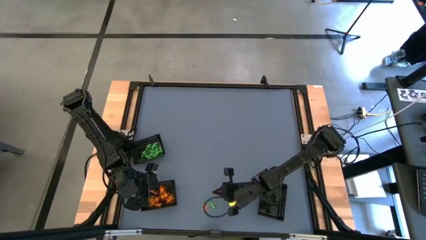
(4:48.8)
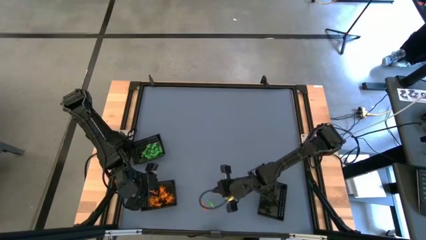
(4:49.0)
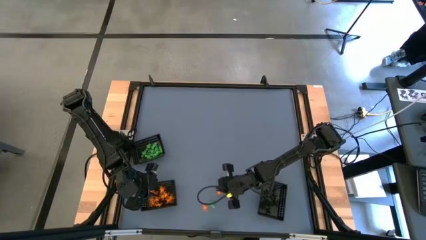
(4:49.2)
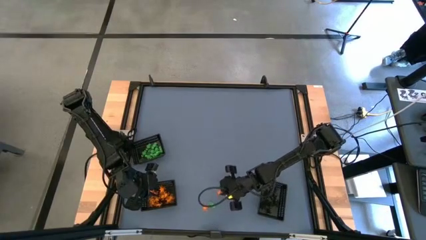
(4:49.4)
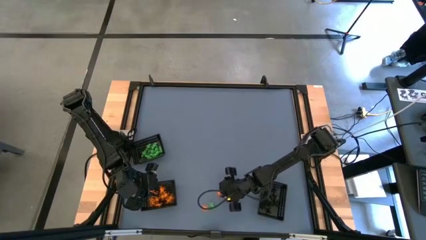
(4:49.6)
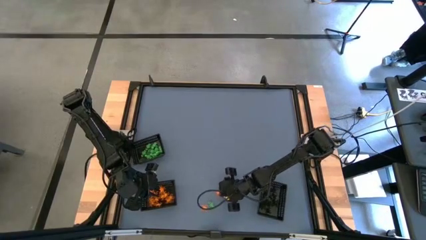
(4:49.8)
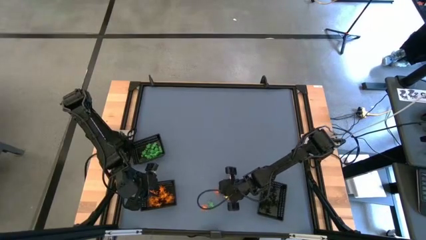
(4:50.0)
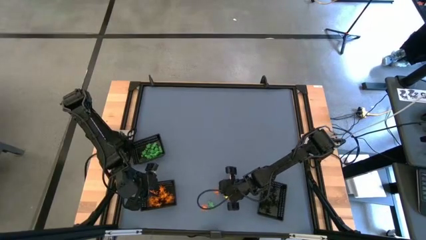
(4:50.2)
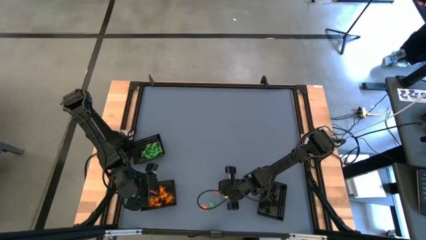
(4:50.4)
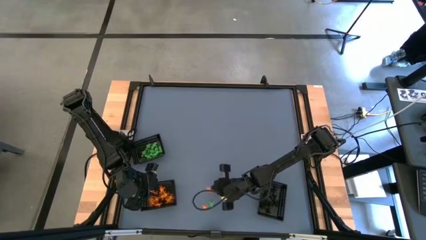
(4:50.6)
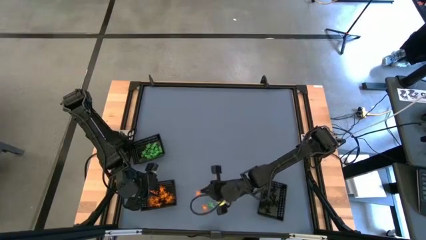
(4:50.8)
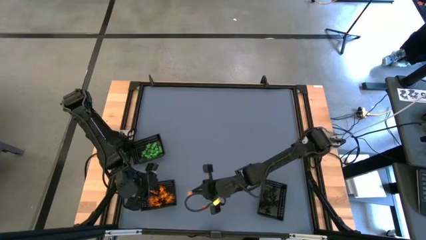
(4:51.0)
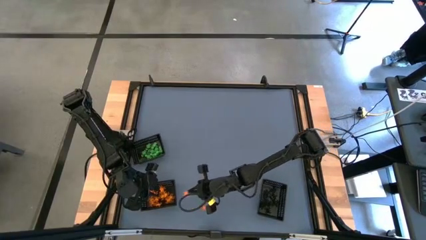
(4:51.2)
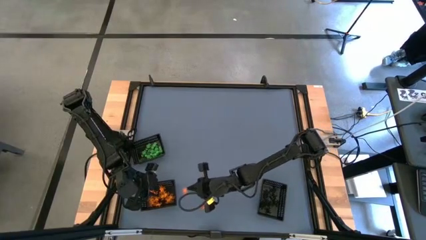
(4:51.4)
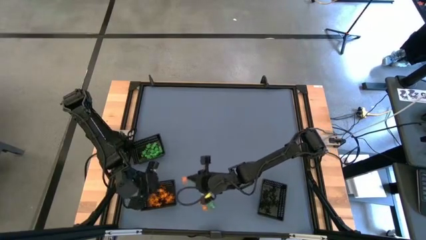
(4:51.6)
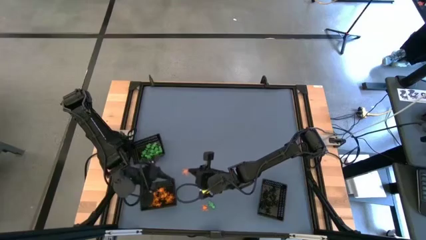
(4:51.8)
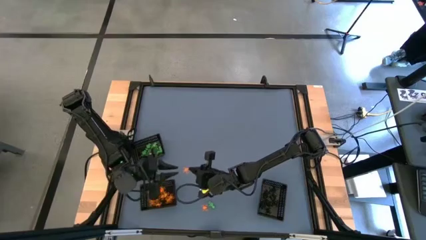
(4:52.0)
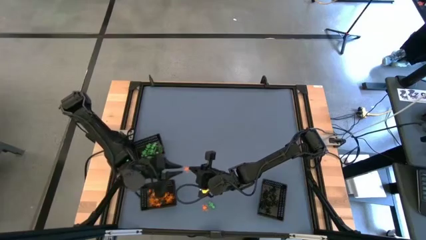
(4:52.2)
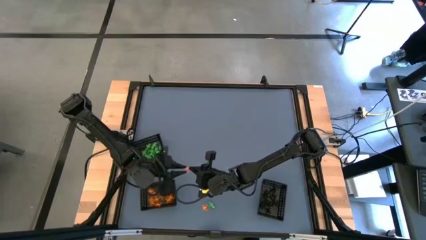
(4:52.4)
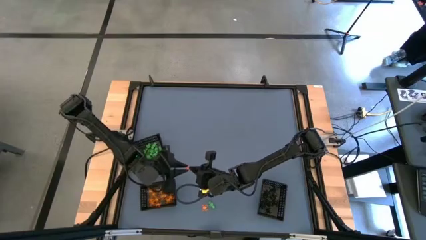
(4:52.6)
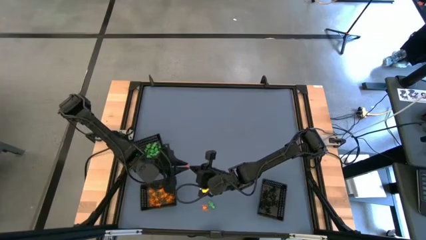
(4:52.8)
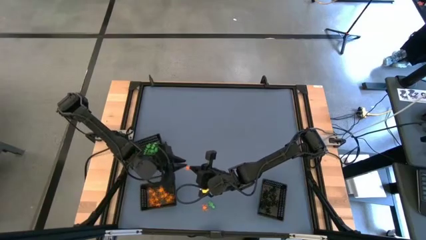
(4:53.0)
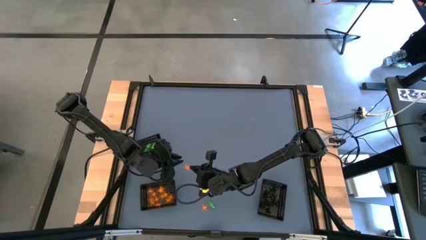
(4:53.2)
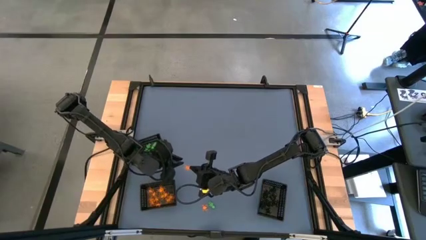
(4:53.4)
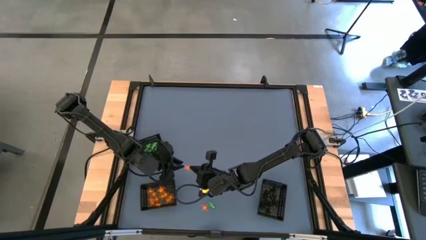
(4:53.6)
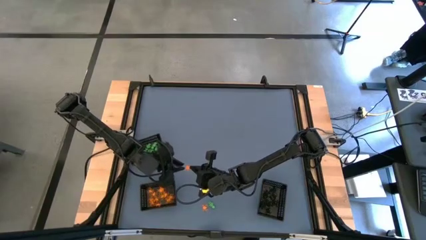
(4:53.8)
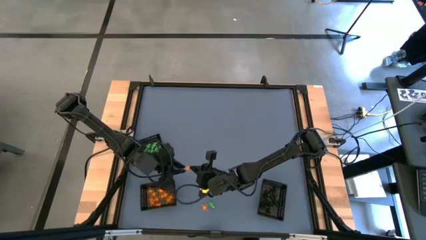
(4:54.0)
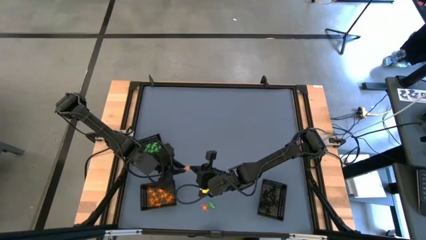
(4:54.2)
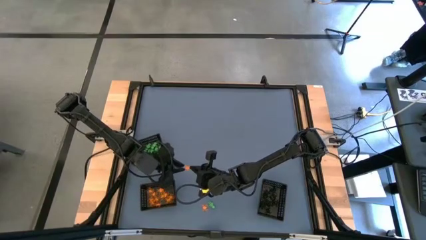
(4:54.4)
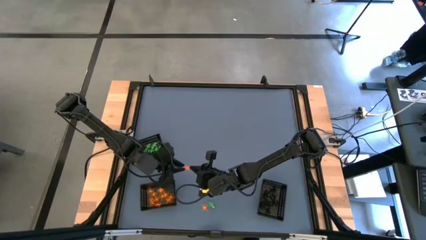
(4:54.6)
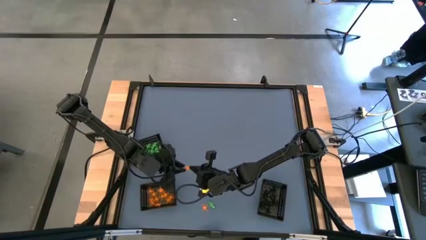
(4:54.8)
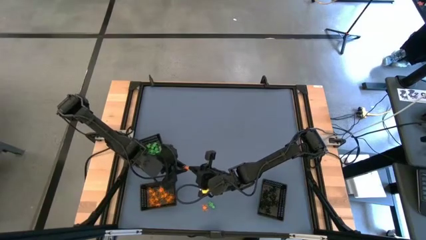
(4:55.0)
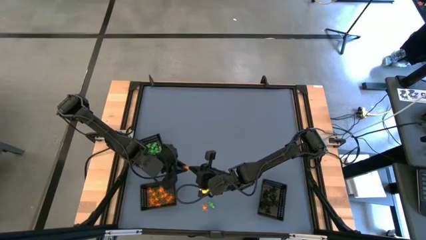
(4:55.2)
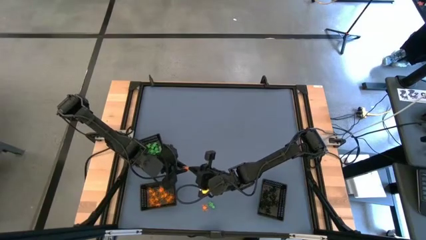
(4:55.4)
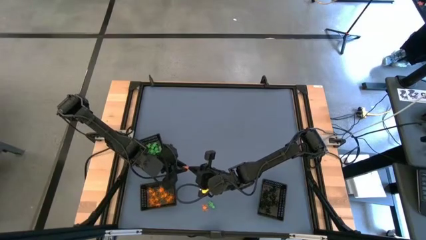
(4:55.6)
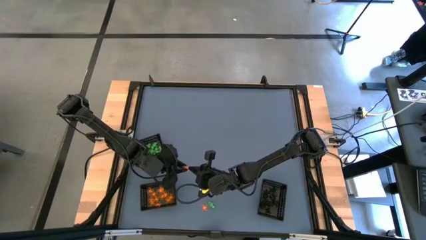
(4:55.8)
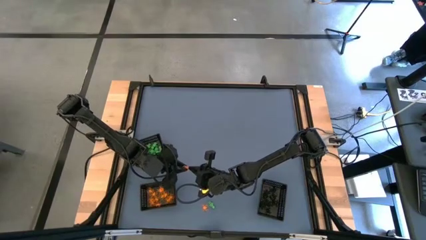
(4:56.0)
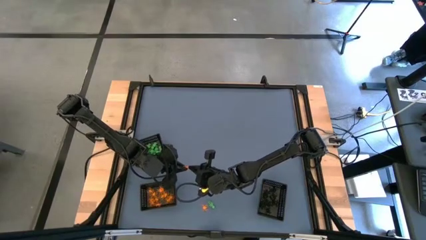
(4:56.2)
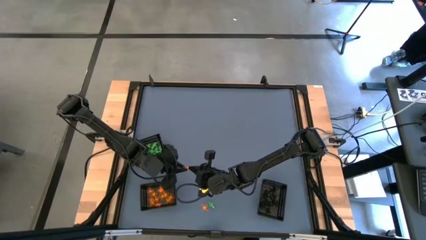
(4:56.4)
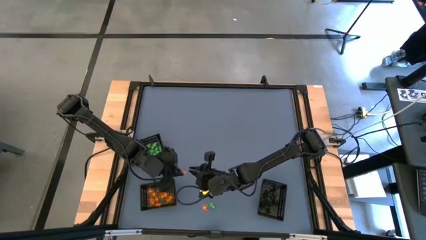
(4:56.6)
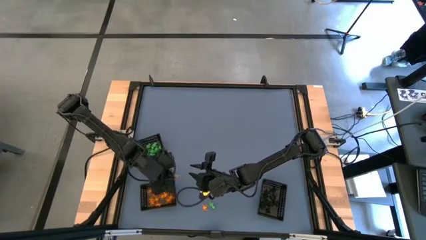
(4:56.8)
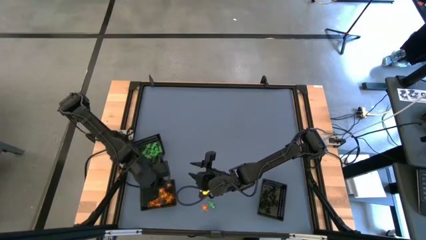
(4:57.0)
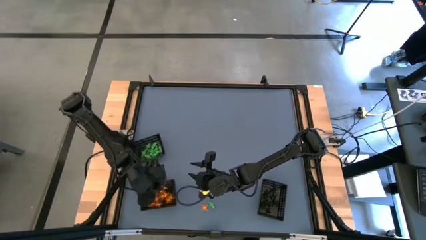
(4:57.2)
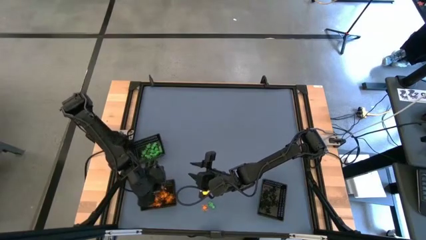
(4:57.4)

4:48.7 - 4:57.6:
Task: Sort Halloween decoration
Put the orange spider toy into the bottom left black bin

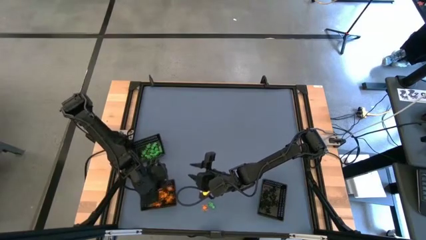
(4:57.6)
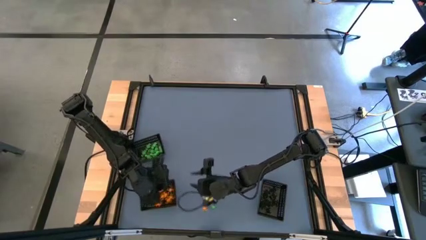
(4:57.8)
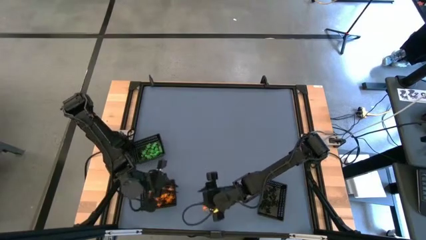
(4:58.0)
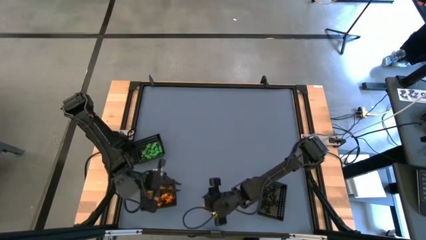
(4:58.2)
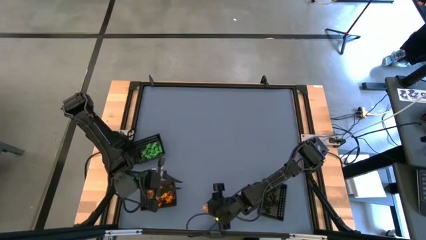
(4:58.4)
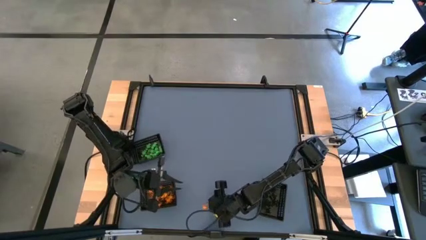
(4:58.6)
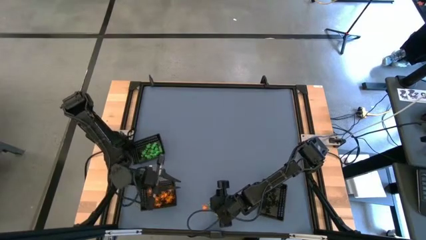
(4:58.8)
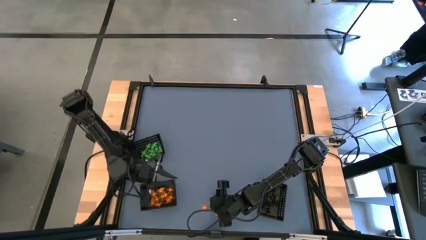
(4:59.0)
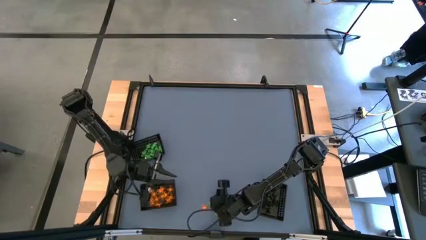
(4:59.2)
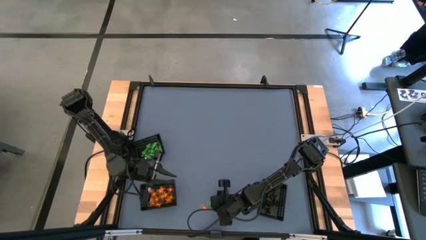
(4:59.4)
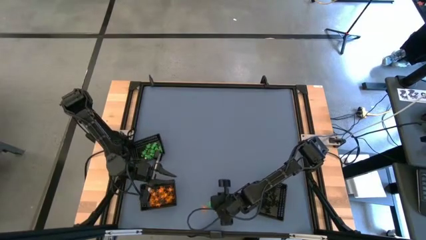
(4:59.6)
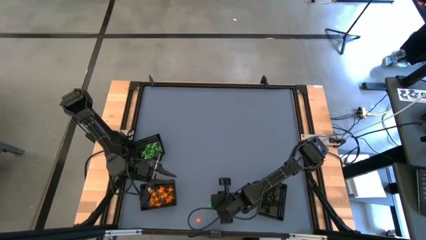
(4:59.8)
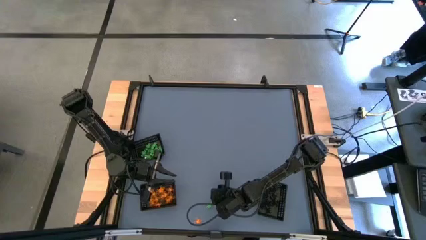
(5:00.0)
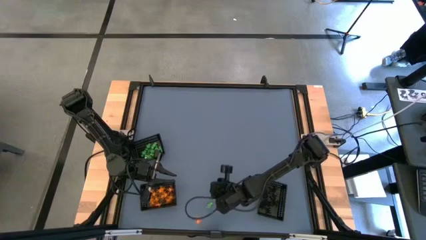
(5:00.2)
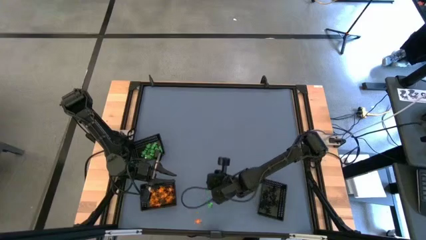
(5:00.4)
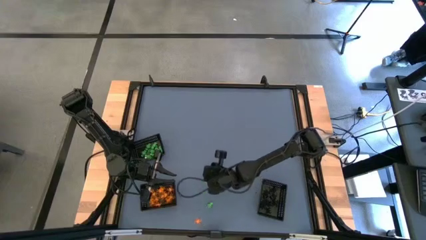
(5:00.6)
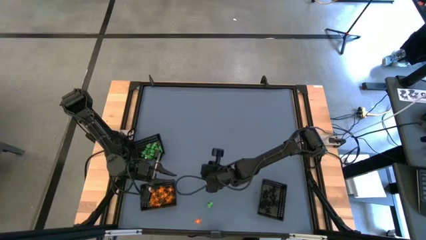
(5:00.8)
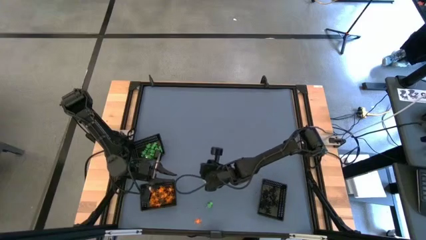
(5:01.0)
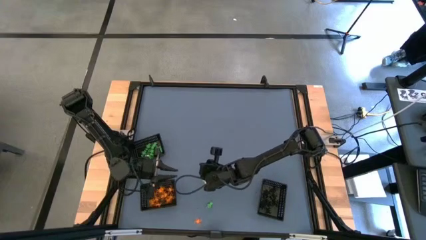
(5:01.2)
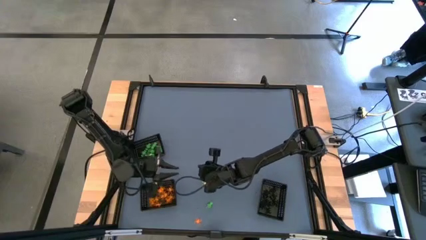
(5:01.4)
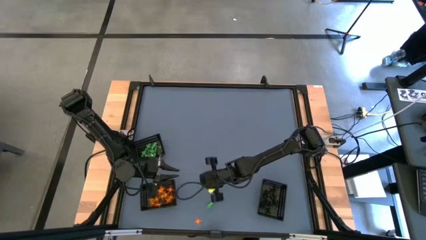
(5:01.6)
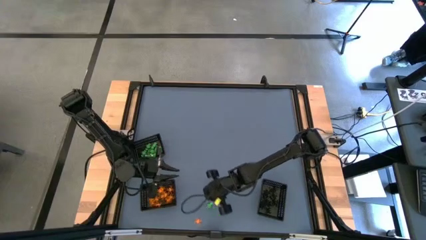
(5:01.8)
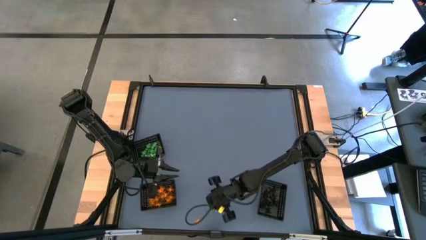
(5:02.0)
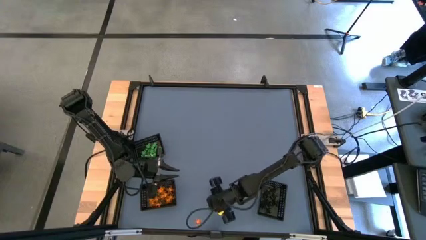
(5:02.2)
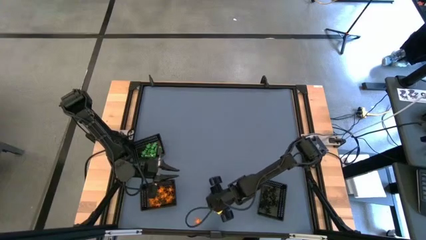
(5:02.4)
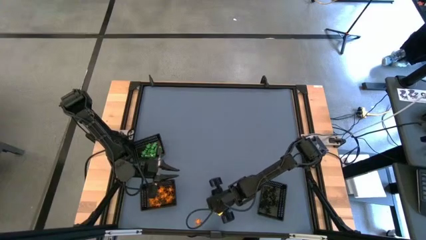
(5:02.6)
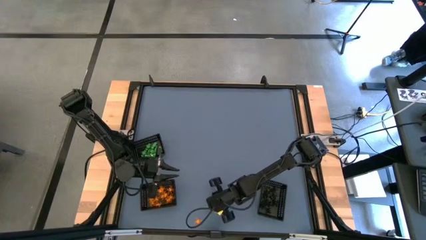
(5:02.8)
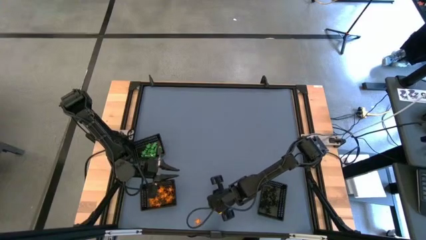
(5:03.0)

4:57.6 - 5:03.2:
Put the green skeleton toy into the top black bin

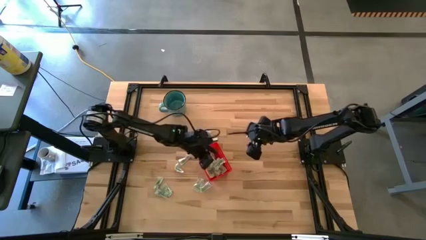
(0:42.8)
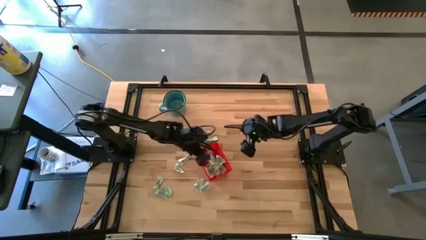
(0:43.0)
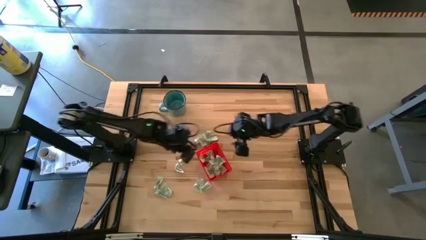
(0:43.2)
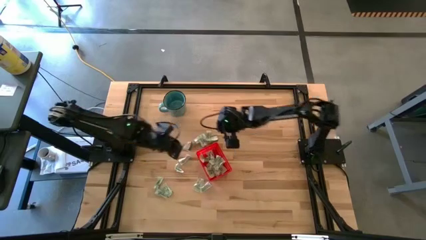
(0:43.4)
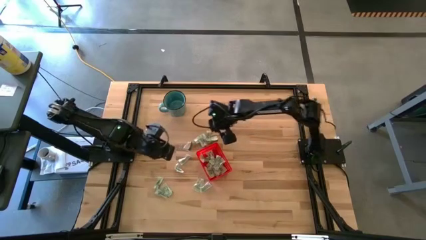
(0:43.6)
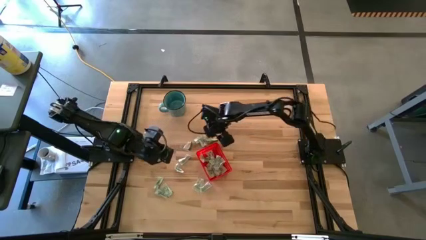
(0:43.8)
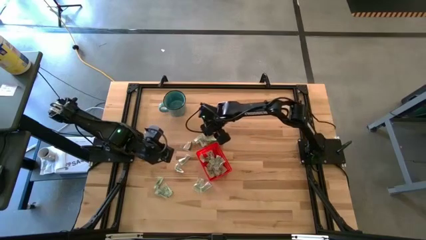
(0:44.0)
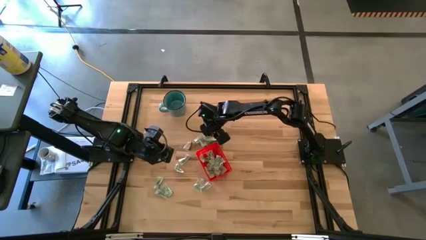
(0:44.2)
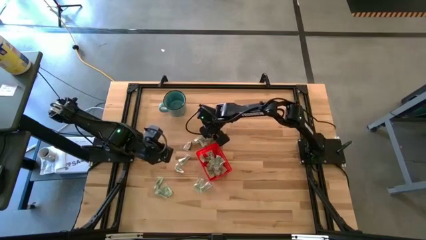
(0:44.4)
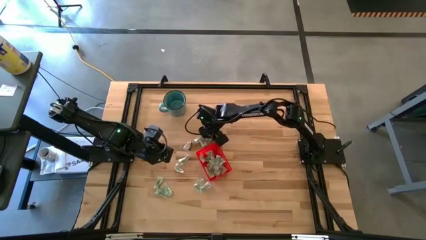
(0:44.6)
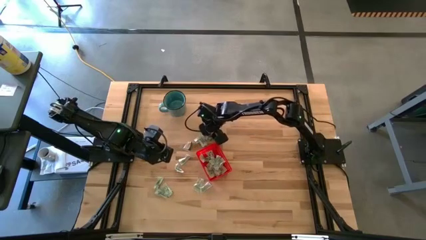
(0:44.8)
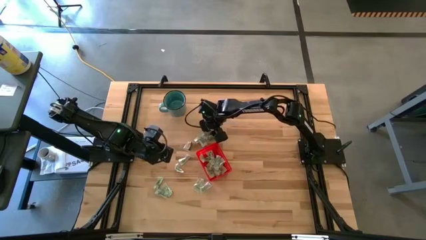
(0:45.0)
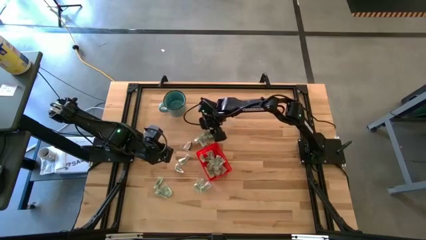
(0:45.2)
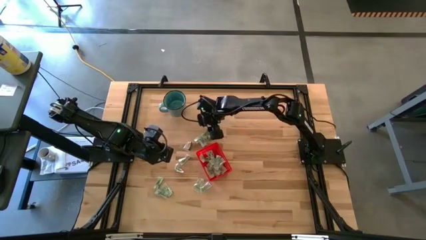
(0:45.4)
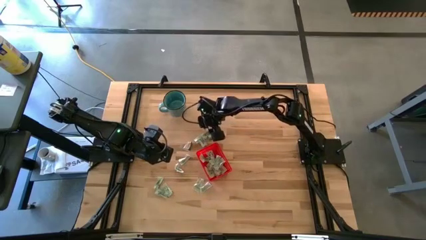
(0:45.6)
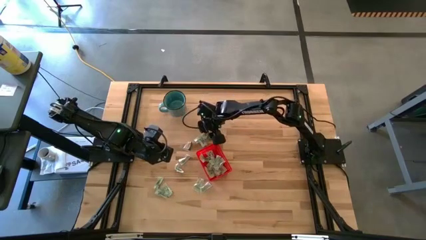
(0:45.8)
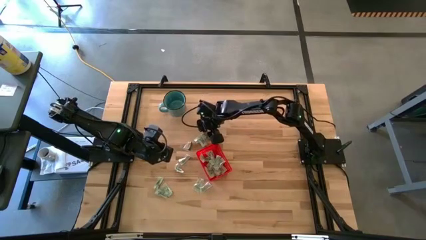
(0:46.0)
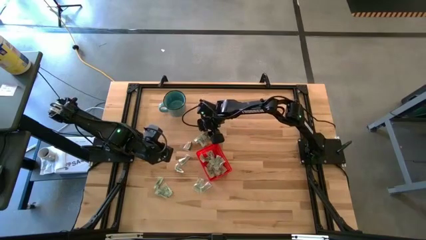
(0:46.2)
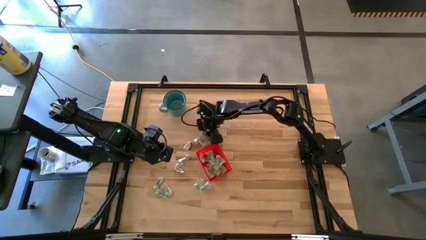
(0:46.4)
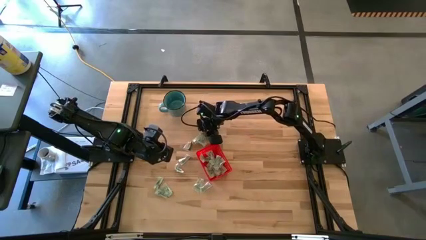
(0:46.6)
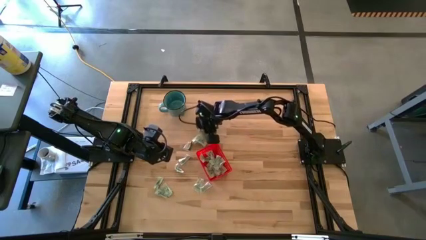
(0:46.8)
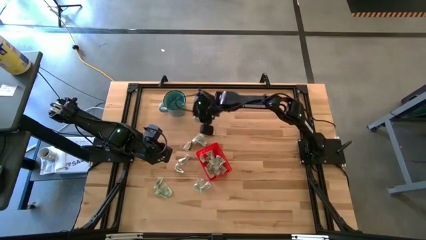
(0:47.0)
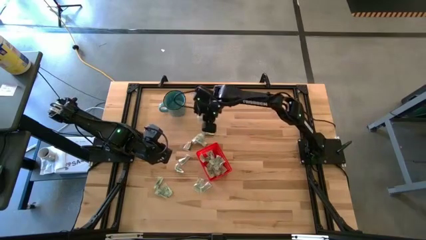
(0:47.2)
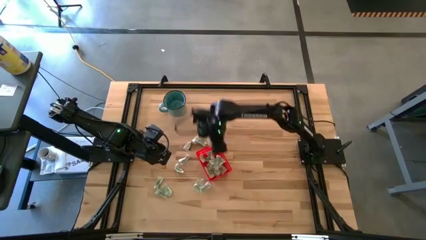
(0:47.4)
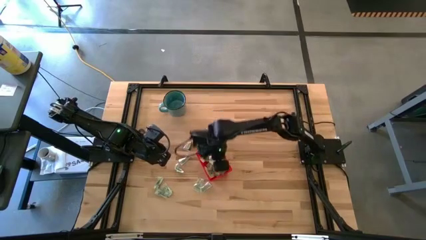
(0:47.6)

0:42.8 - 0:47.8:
Task: Pick and place Stevia / Truvia into bins
Put the white stevia packet into the basket
